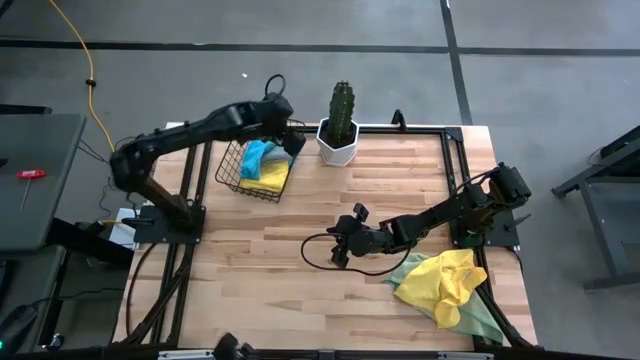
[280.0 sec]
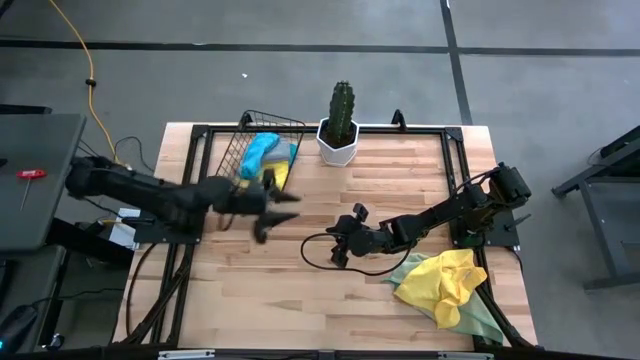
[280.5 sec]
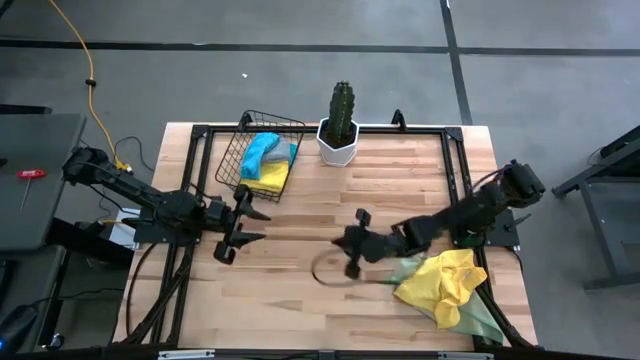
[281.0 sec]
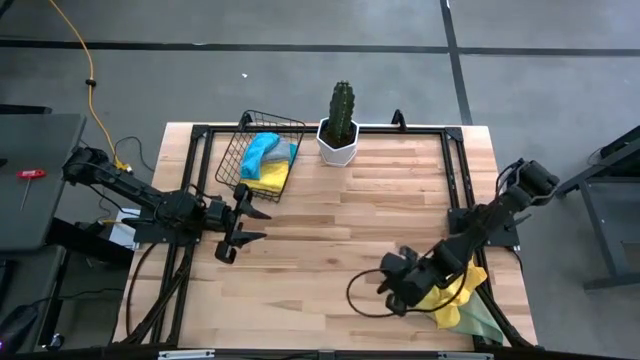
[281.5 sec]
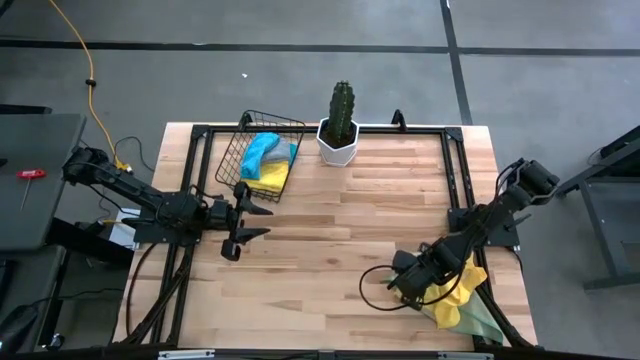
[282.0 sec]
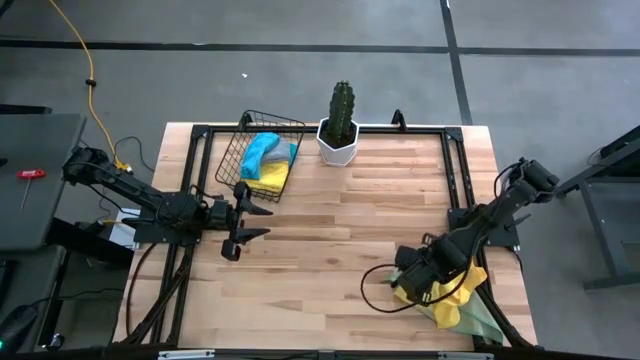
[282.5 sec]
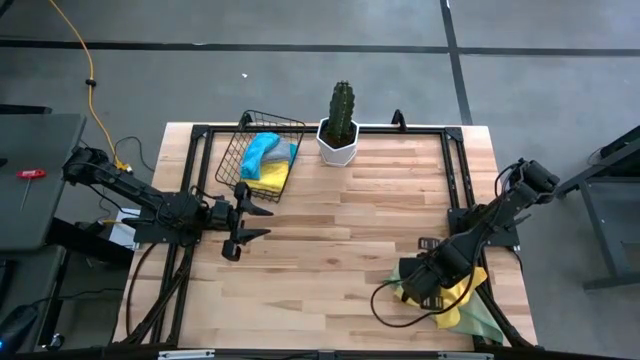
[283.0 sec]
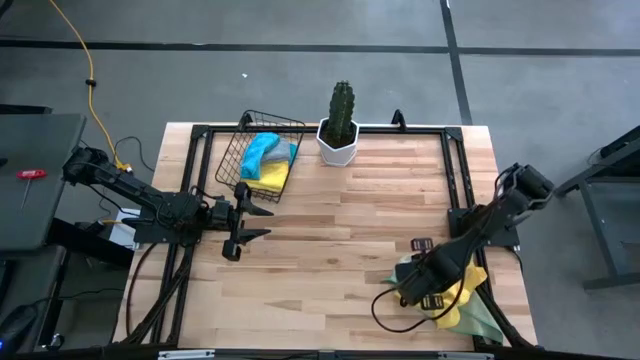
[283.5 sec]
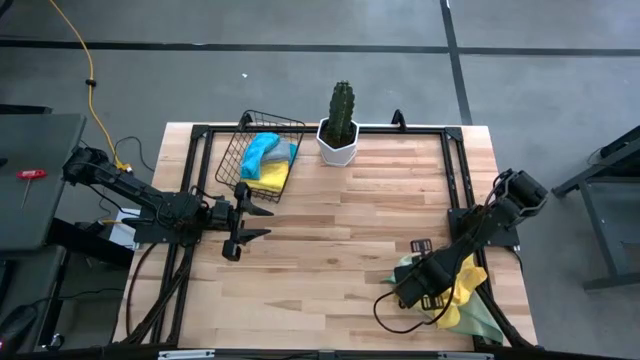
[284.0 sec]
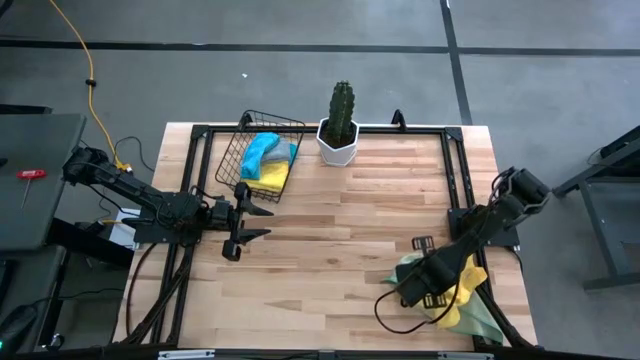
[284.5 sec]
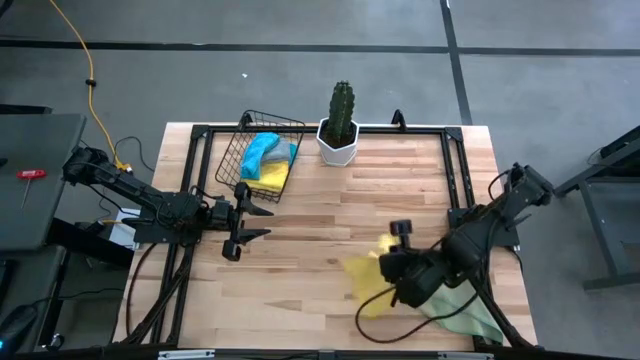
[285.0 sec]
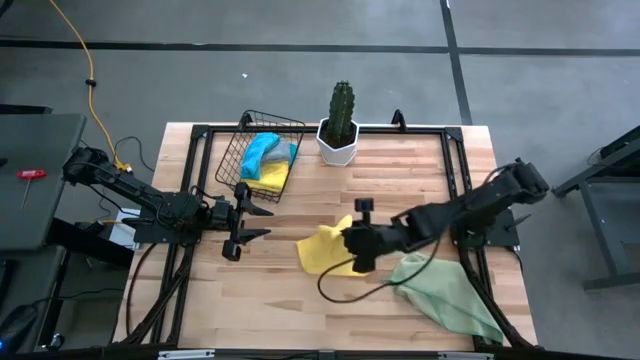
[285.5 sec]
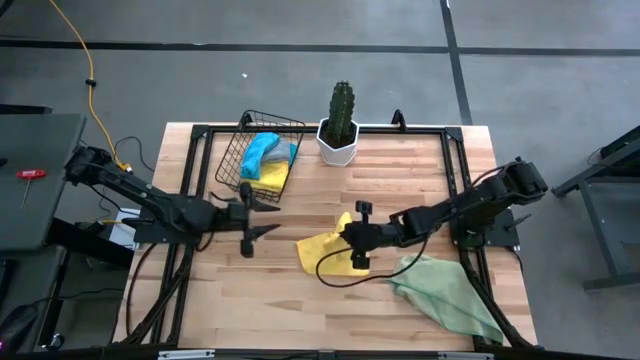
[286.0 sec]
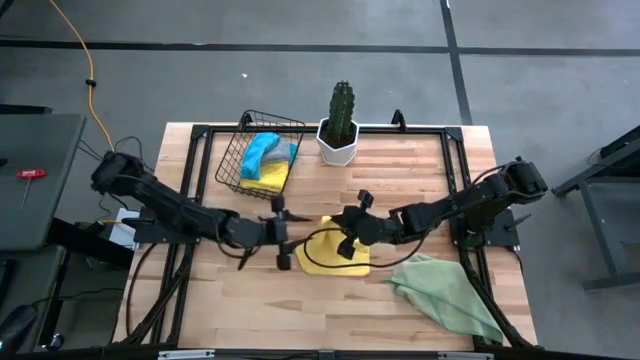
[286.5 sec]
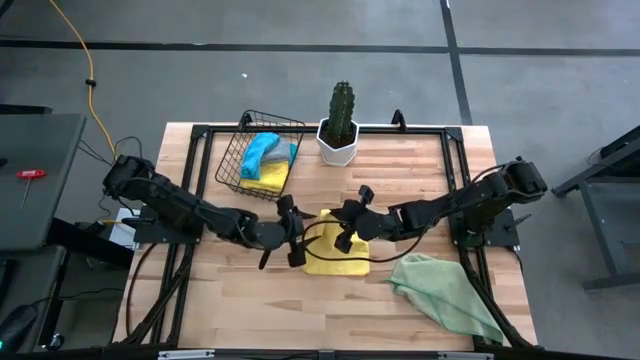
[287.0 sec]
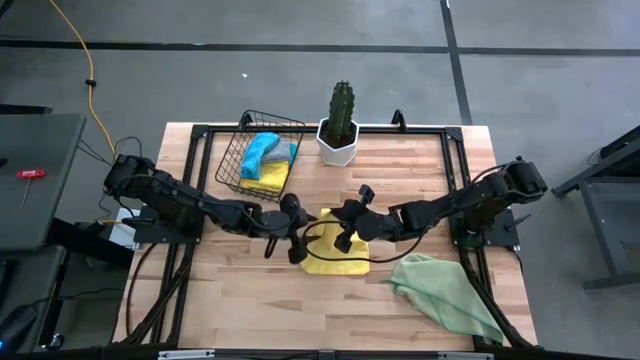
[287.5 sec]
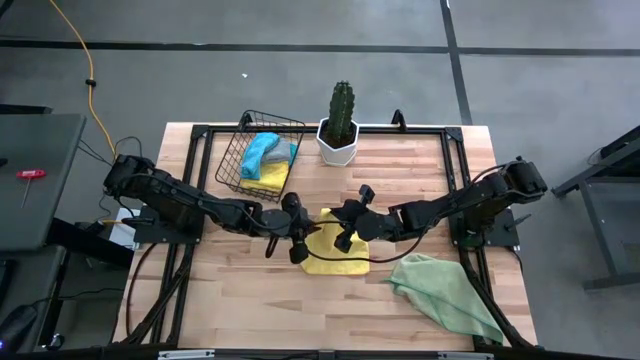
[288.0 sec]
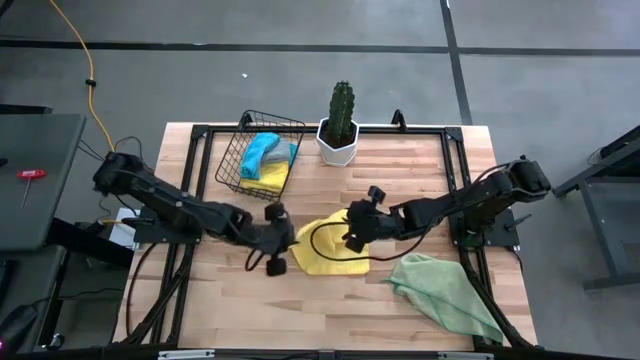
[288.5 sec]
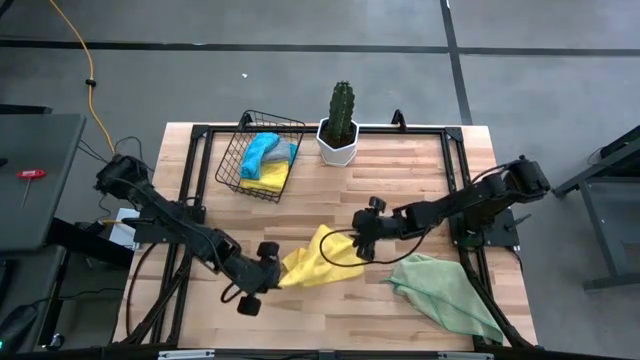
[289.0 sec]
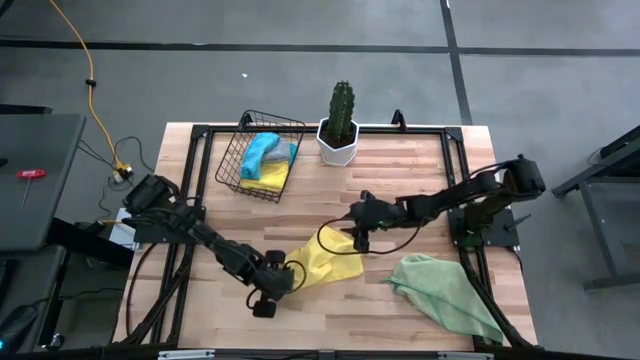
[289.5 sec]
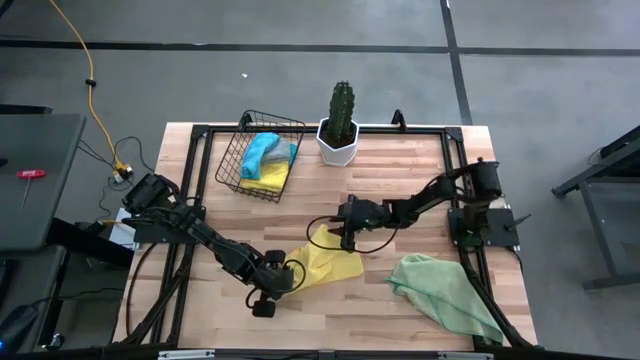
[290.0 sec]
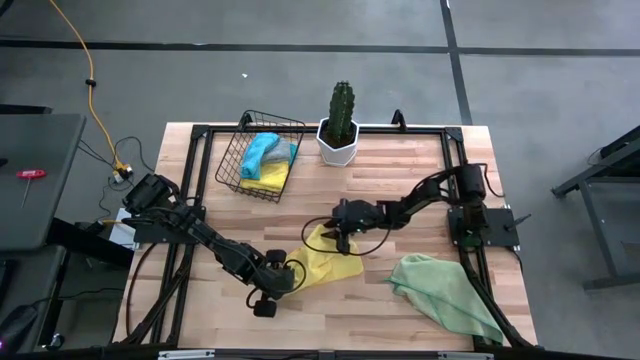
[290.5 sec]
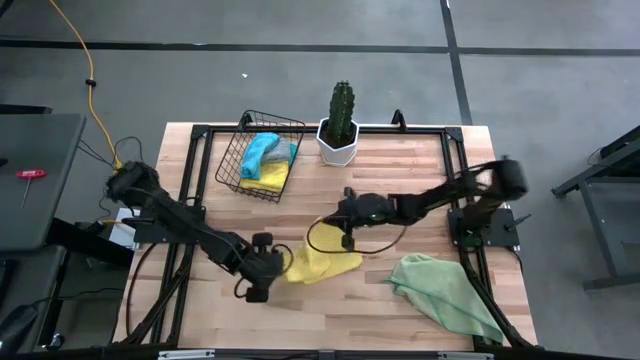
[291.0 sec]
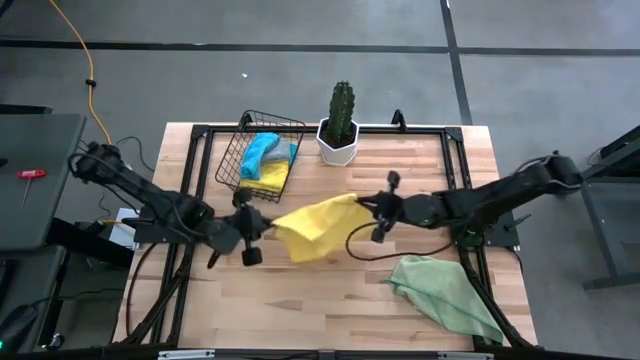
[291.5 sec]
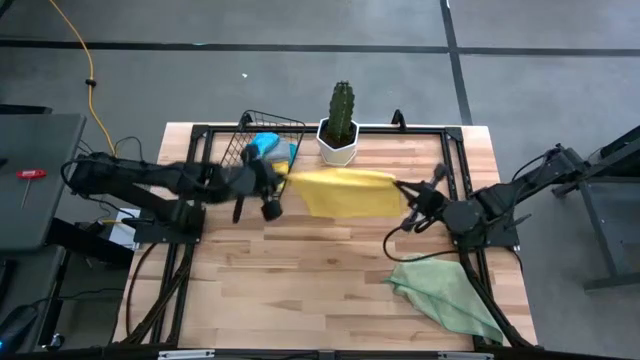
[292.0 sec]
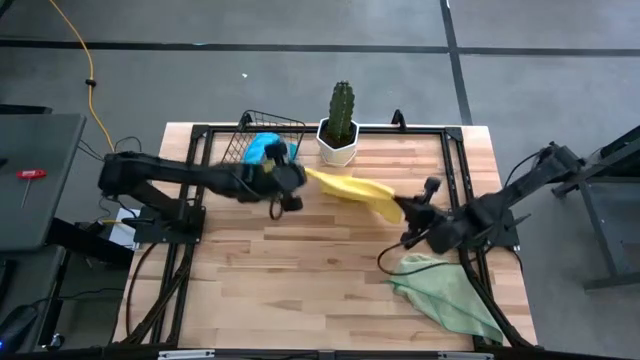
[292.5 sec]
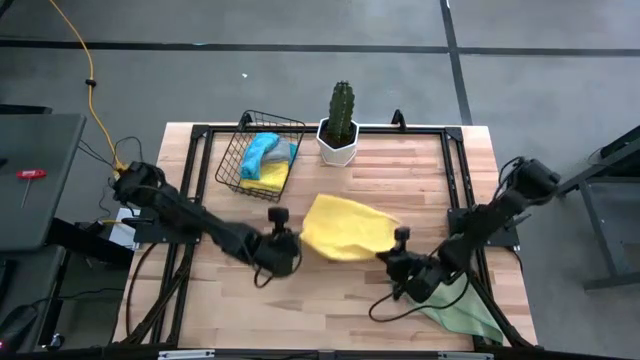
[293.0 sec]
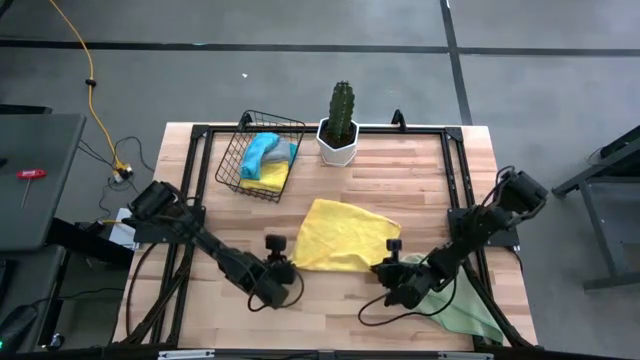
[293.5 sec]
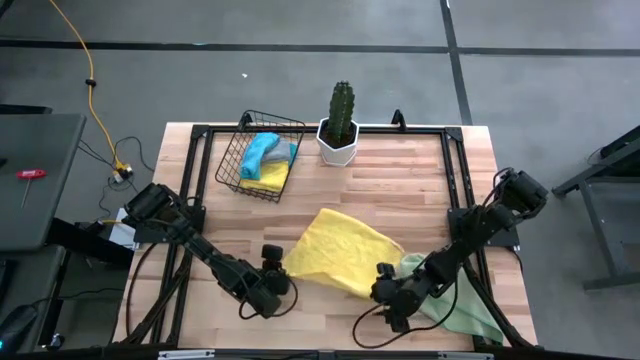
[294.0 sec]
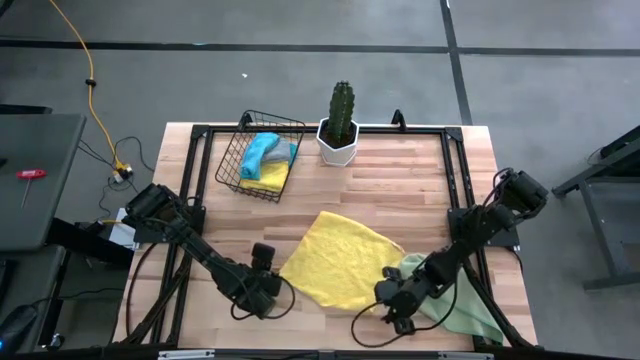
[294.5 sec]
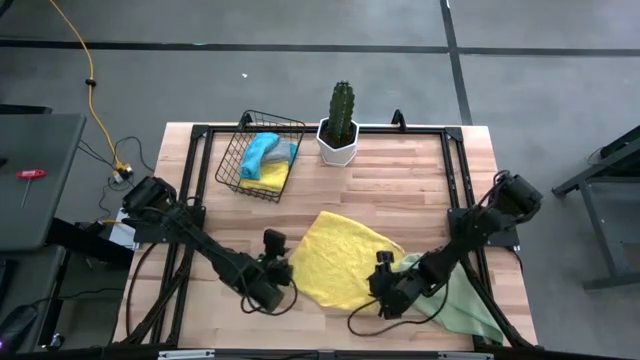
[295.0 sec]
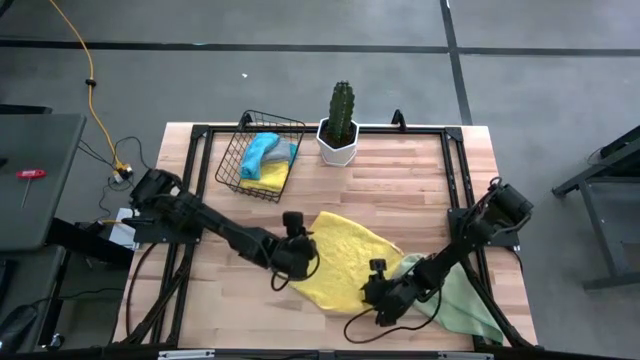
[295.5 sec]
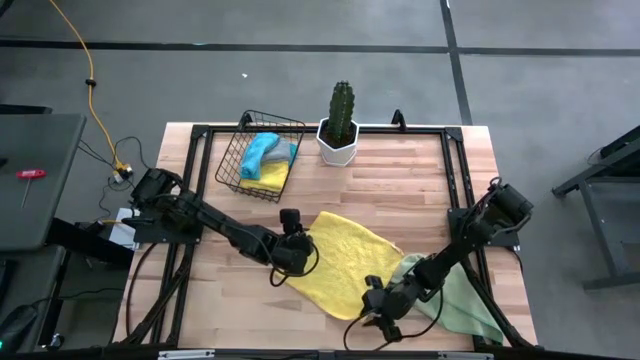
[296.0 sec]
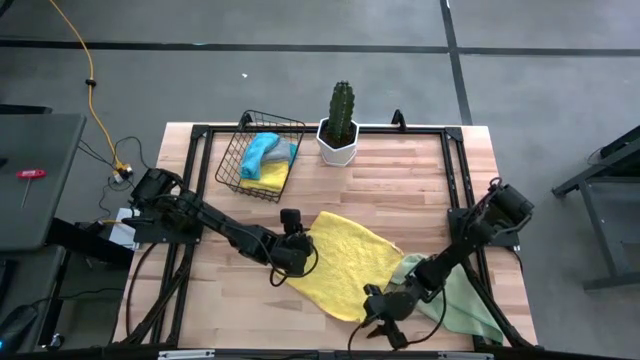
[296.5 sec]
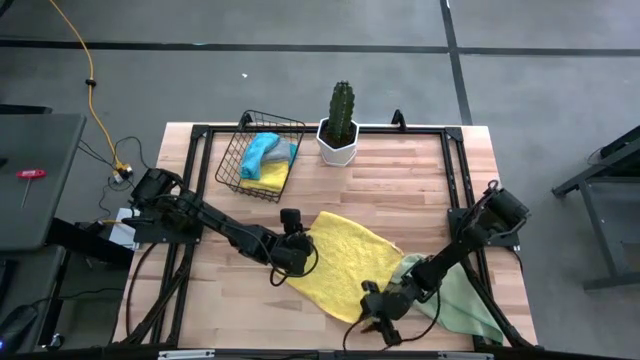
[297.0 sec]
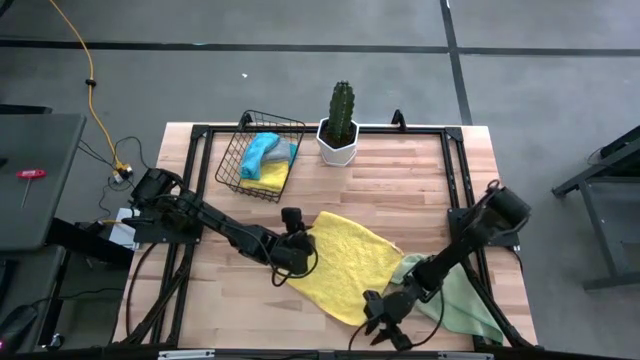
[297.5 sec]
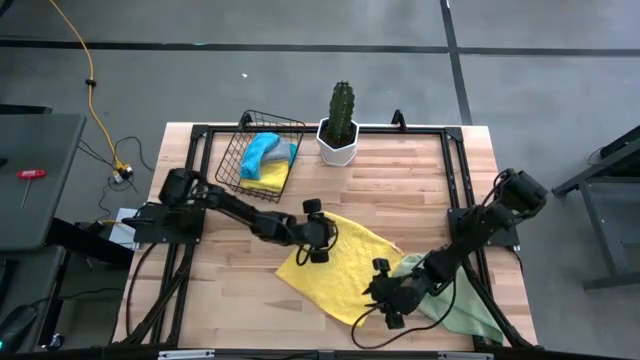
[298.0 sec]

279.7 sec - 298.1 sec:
Task: Fold microfiber towels
Fold the yellow microfiber towel on the table

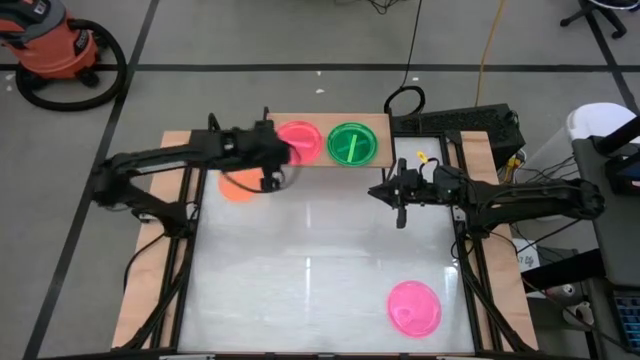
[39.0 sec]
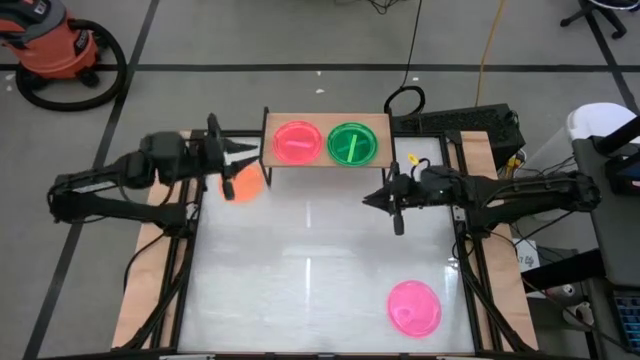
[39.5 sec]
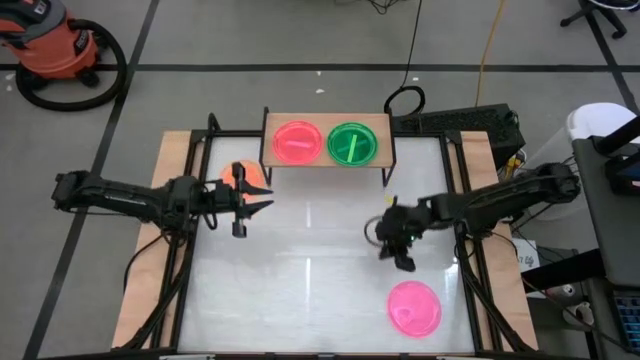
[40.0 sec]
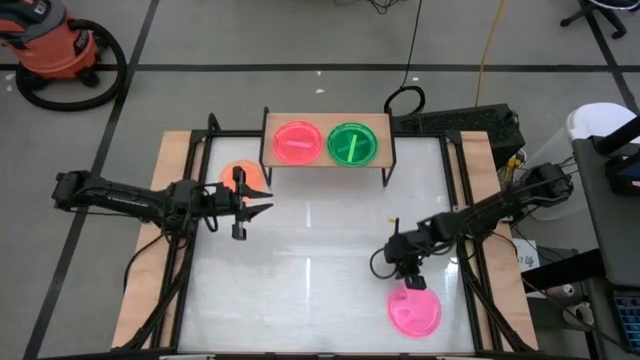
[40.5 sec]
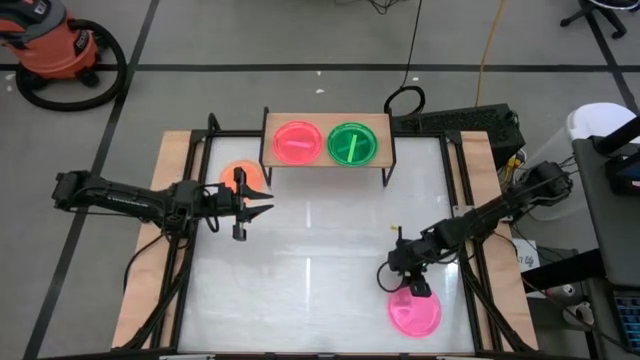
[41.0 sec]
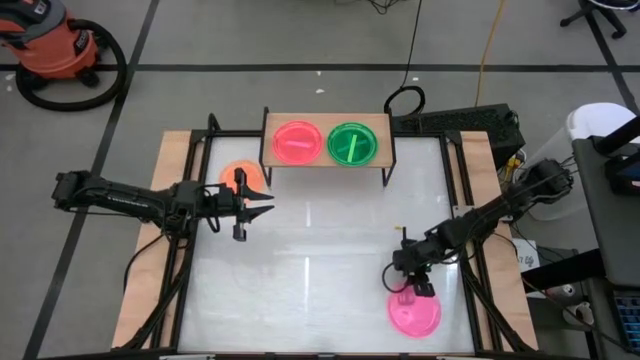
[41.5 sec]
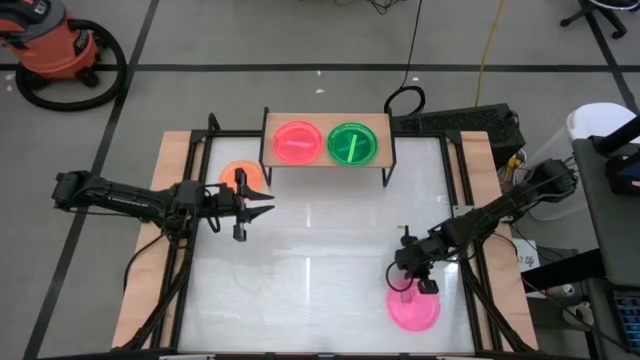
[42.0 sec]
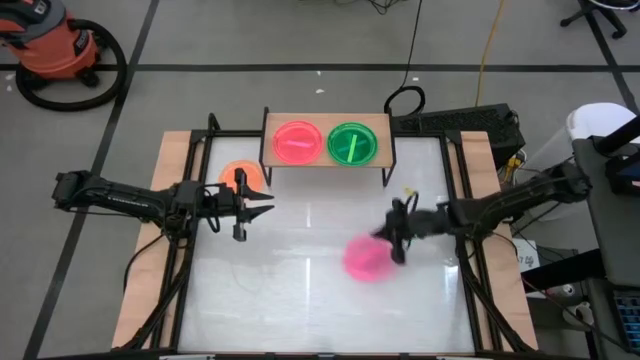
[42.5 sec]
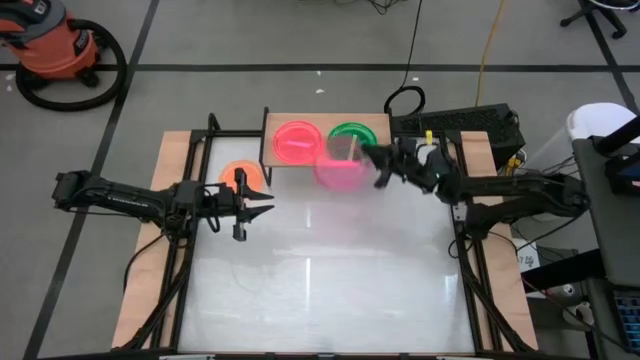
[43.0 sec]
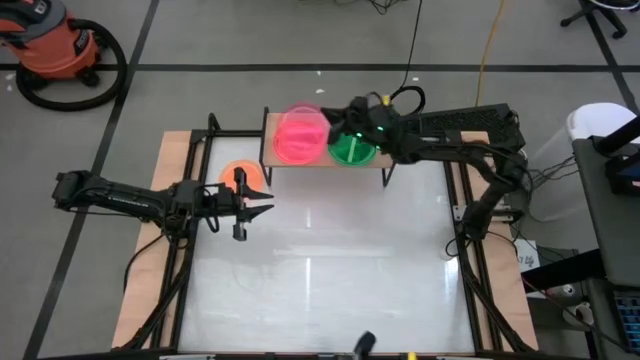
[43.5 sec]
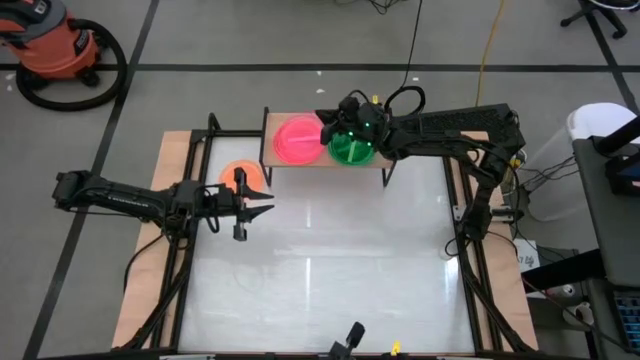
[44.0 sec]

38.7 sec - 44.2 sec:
Task: Place and stack plates onto a shelf
Stack the pink transparent plate on the pink transparent plate on the shelf
